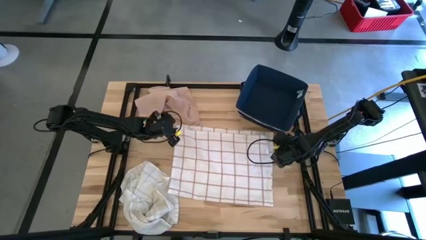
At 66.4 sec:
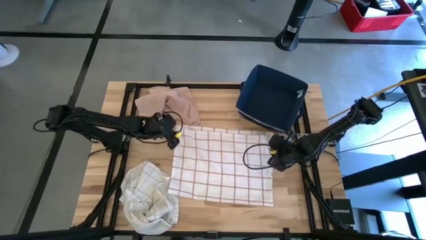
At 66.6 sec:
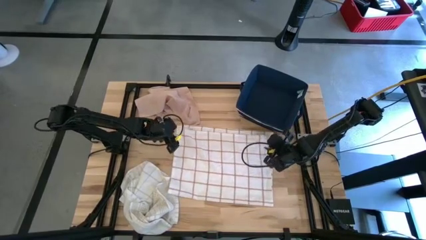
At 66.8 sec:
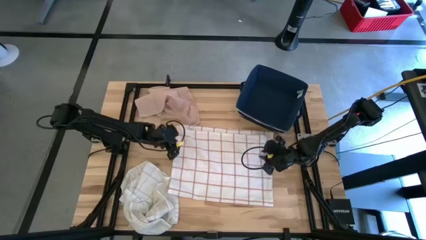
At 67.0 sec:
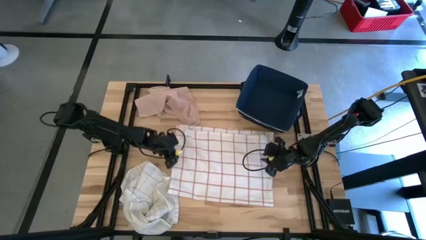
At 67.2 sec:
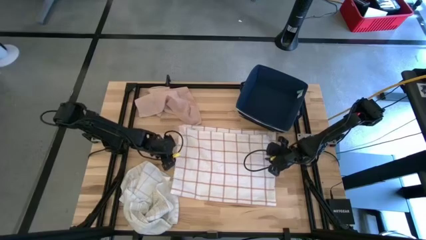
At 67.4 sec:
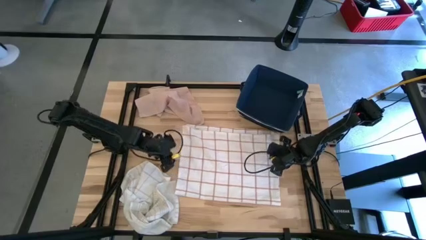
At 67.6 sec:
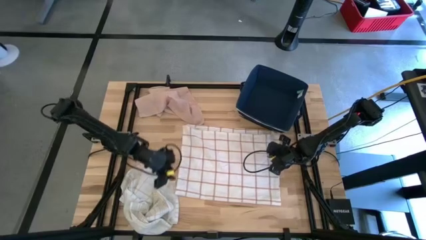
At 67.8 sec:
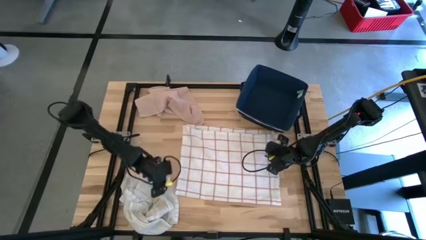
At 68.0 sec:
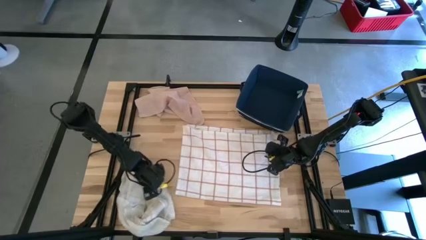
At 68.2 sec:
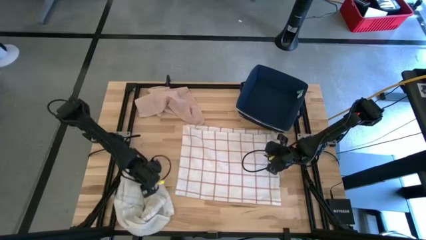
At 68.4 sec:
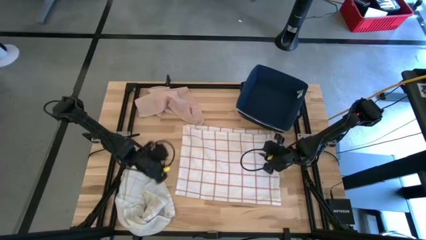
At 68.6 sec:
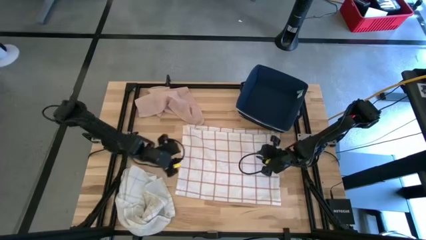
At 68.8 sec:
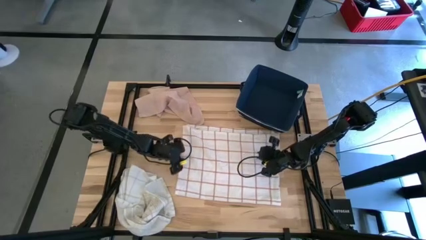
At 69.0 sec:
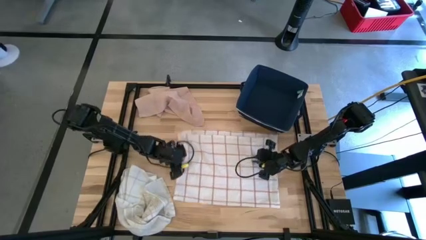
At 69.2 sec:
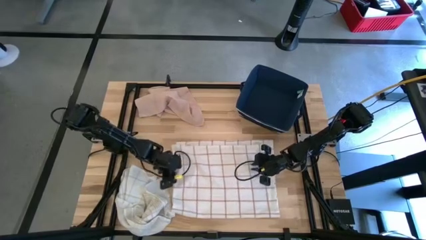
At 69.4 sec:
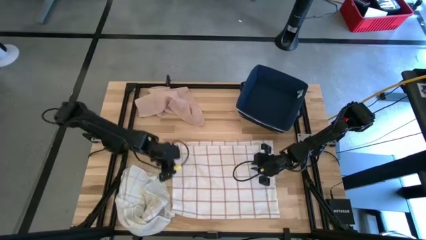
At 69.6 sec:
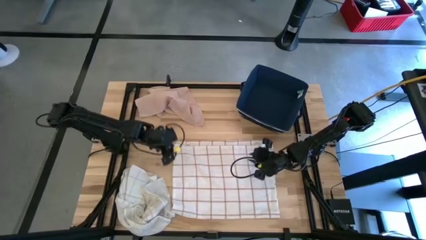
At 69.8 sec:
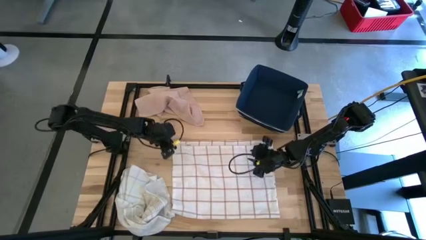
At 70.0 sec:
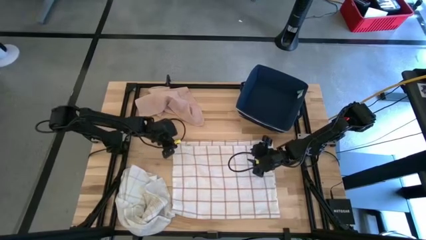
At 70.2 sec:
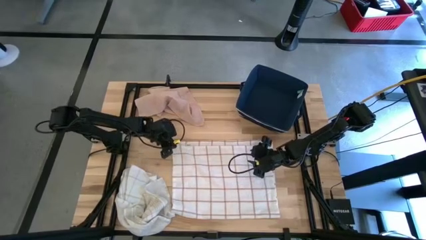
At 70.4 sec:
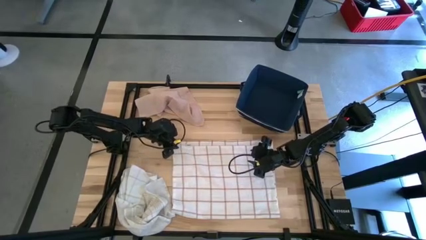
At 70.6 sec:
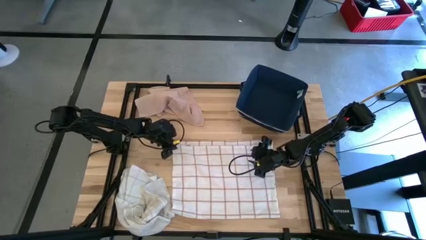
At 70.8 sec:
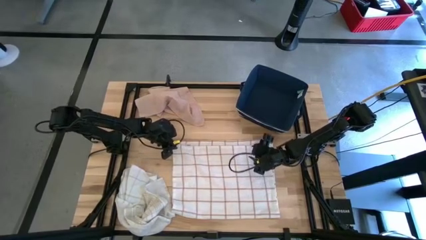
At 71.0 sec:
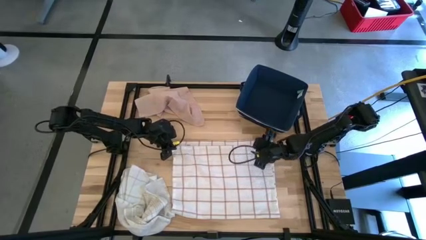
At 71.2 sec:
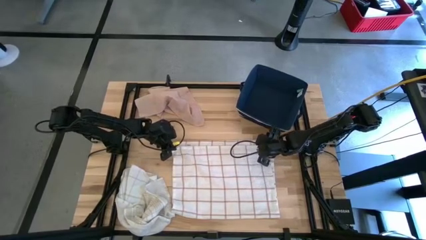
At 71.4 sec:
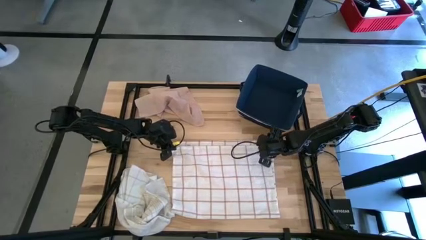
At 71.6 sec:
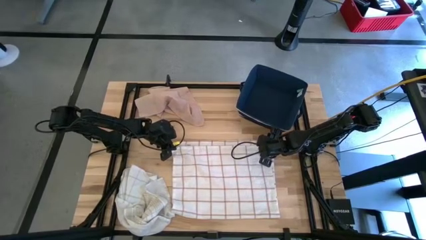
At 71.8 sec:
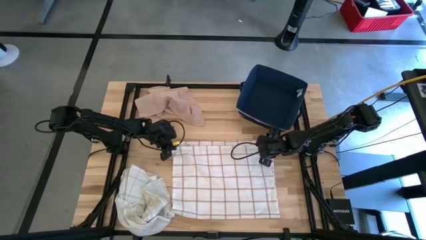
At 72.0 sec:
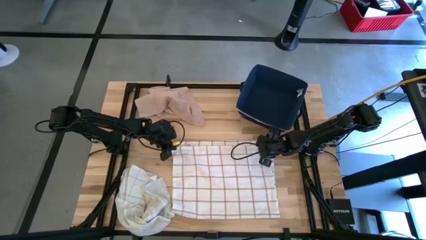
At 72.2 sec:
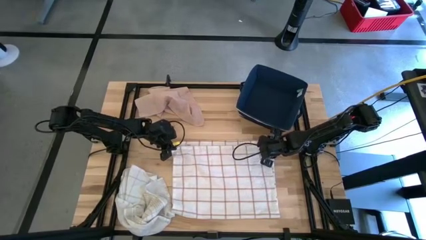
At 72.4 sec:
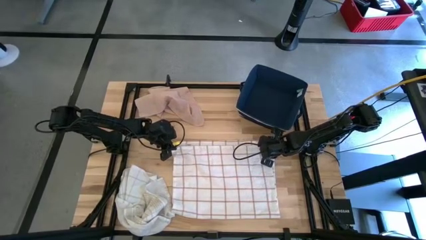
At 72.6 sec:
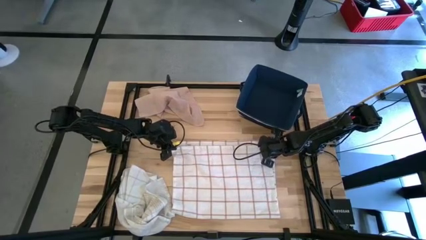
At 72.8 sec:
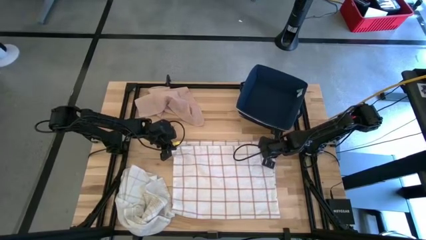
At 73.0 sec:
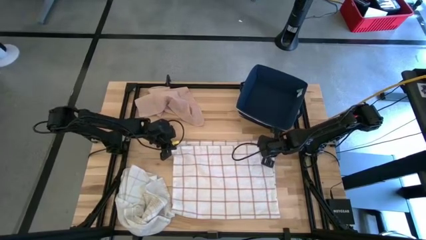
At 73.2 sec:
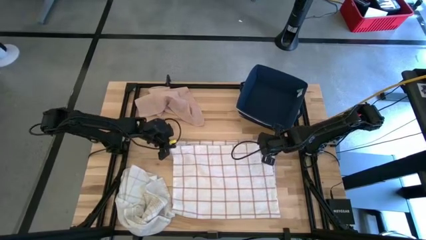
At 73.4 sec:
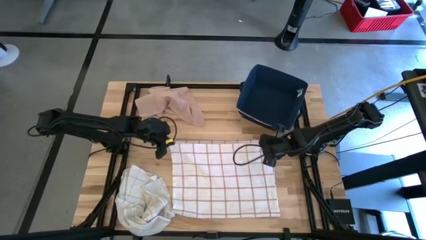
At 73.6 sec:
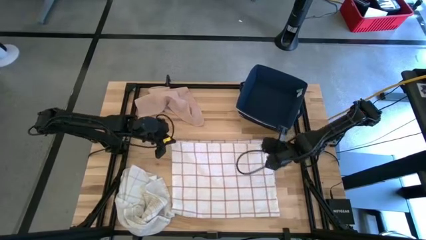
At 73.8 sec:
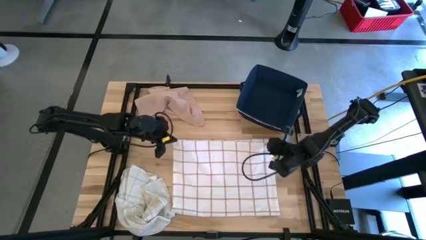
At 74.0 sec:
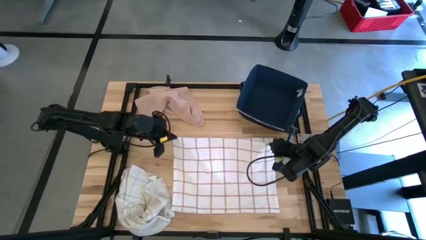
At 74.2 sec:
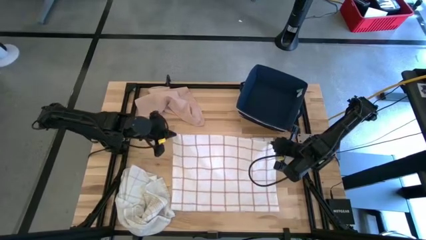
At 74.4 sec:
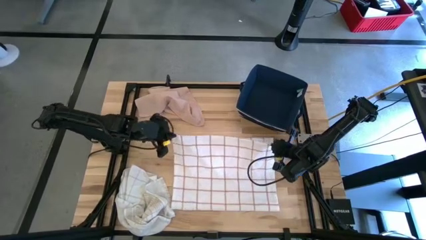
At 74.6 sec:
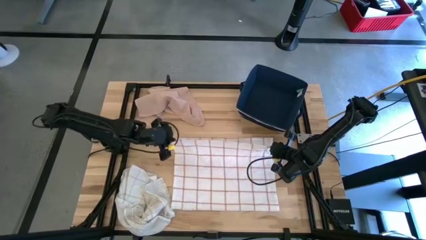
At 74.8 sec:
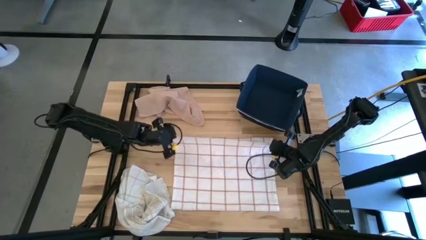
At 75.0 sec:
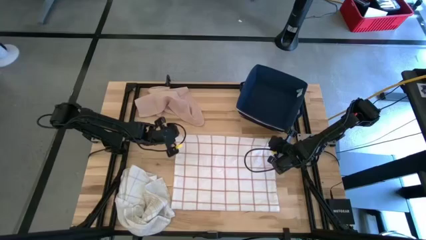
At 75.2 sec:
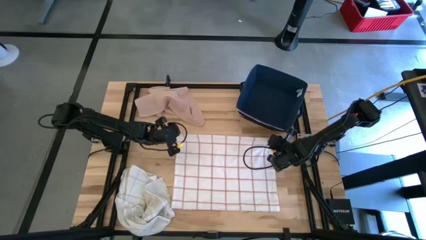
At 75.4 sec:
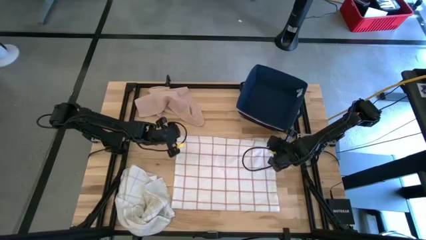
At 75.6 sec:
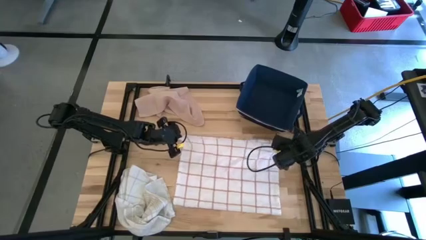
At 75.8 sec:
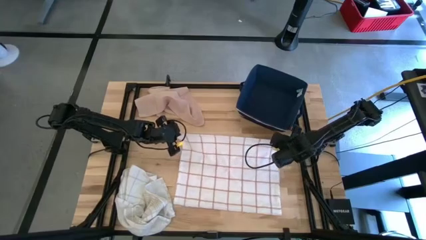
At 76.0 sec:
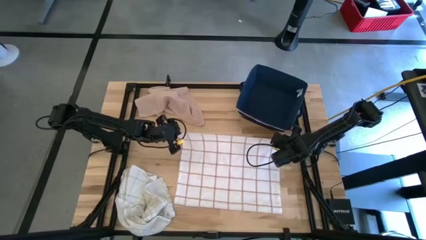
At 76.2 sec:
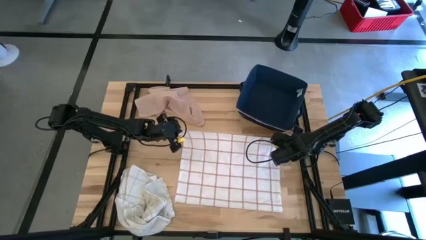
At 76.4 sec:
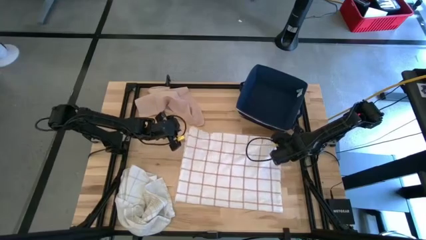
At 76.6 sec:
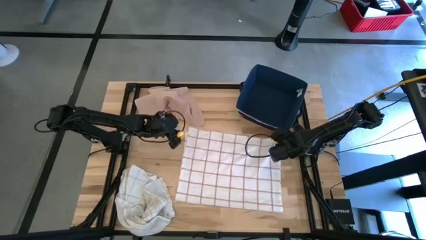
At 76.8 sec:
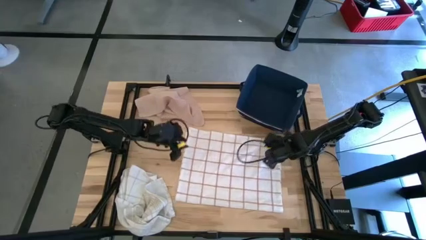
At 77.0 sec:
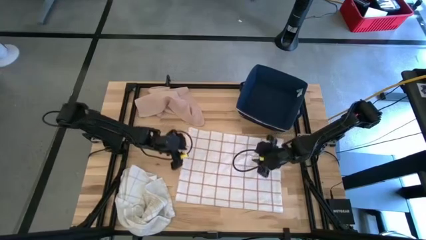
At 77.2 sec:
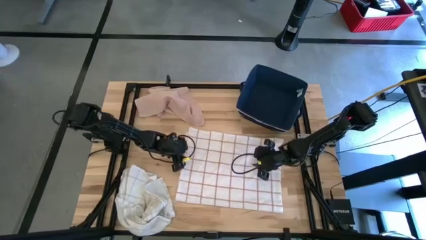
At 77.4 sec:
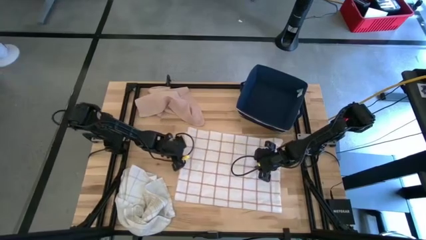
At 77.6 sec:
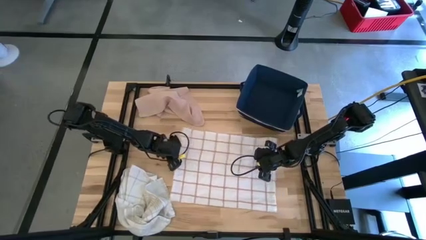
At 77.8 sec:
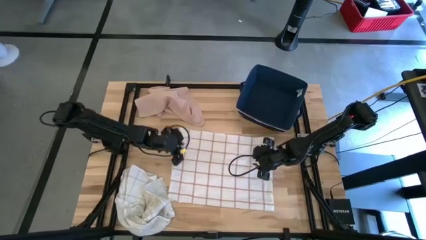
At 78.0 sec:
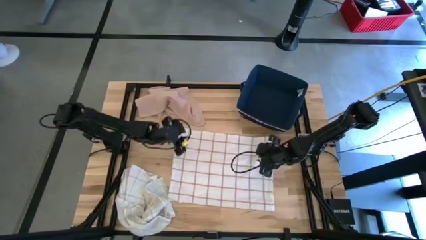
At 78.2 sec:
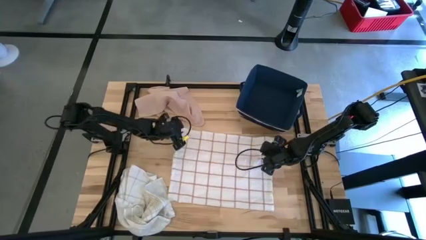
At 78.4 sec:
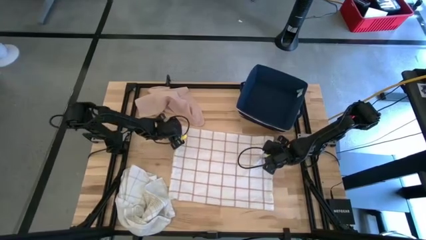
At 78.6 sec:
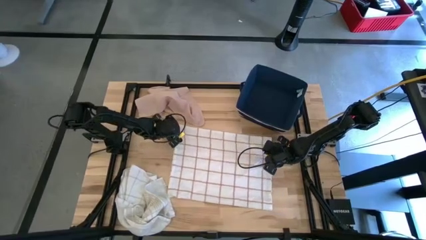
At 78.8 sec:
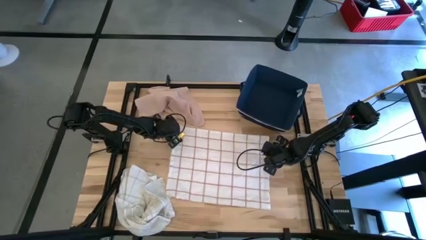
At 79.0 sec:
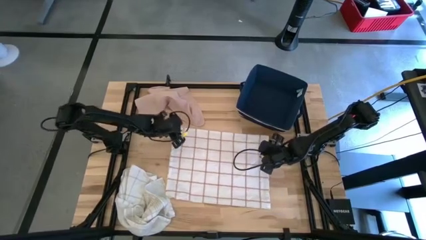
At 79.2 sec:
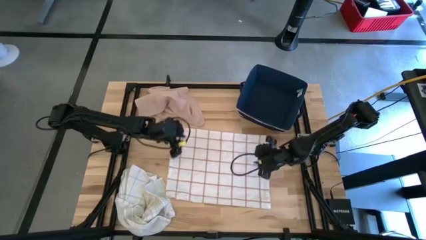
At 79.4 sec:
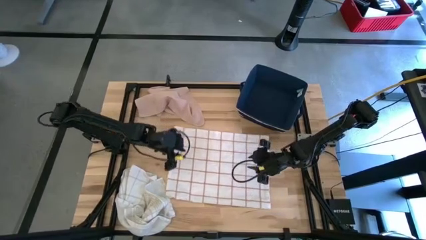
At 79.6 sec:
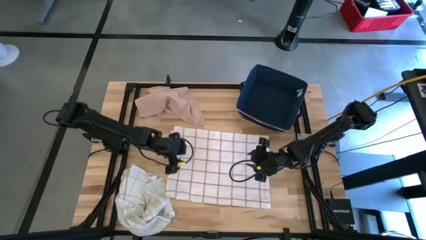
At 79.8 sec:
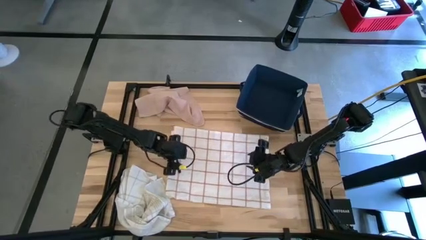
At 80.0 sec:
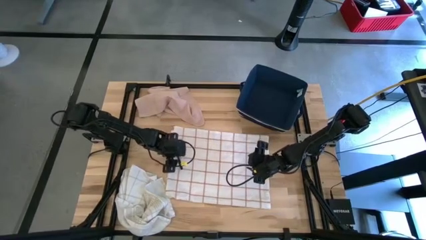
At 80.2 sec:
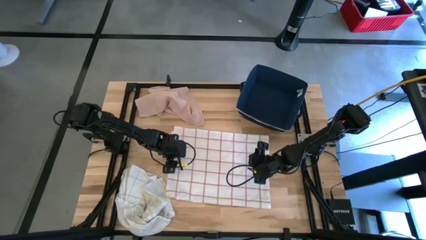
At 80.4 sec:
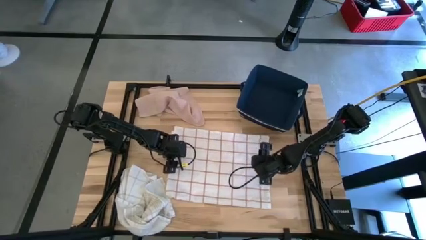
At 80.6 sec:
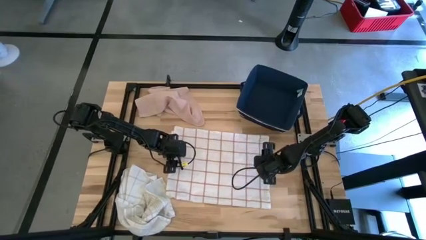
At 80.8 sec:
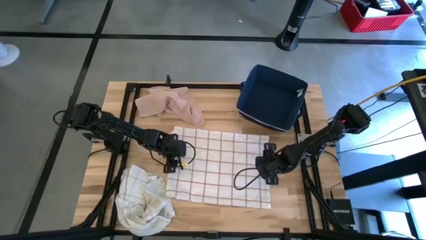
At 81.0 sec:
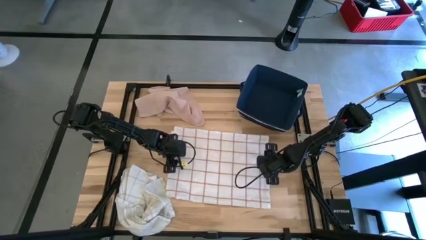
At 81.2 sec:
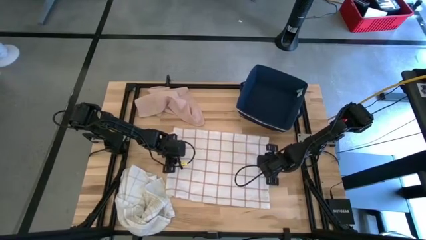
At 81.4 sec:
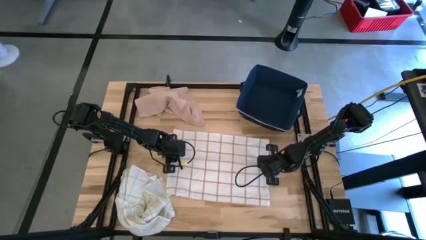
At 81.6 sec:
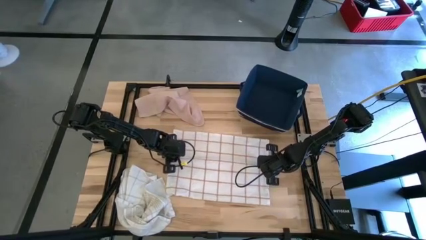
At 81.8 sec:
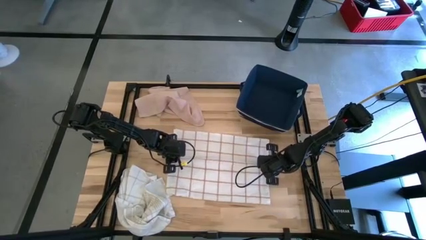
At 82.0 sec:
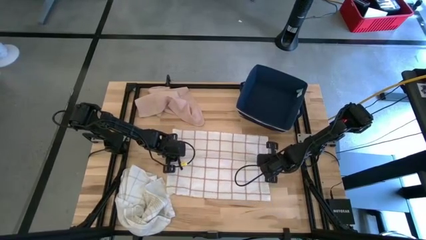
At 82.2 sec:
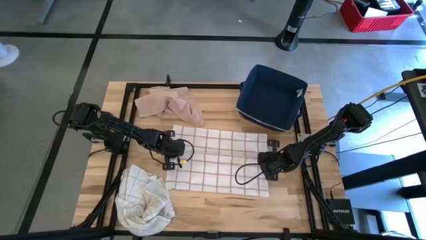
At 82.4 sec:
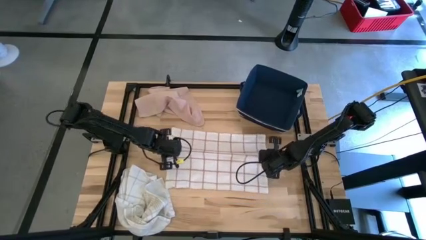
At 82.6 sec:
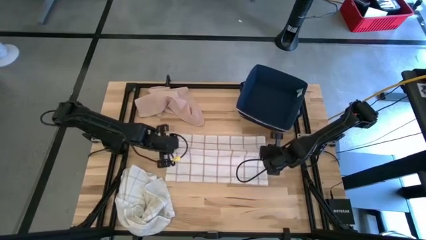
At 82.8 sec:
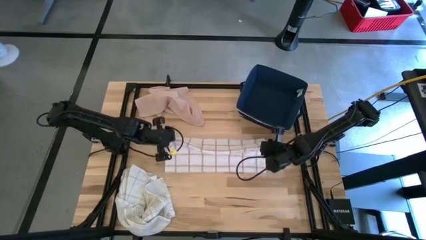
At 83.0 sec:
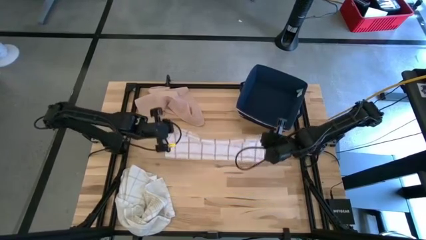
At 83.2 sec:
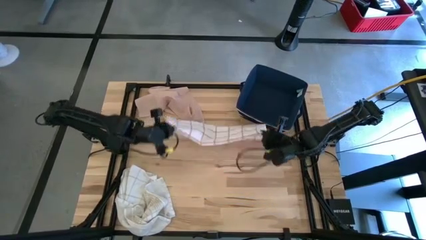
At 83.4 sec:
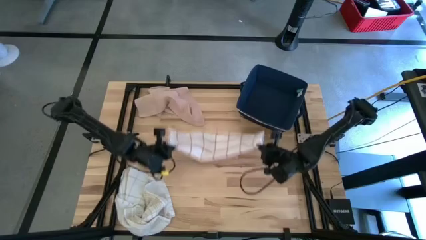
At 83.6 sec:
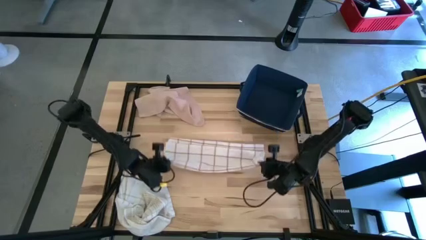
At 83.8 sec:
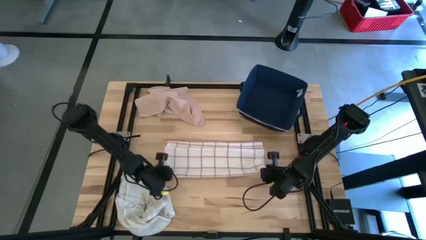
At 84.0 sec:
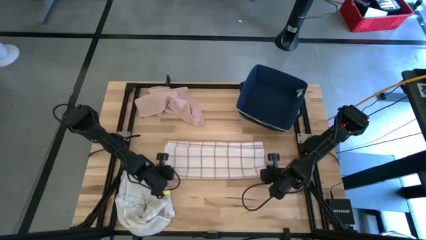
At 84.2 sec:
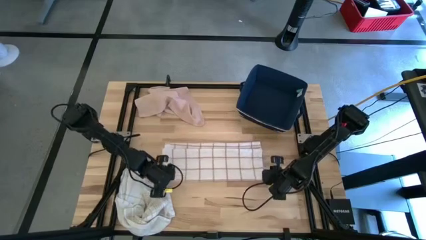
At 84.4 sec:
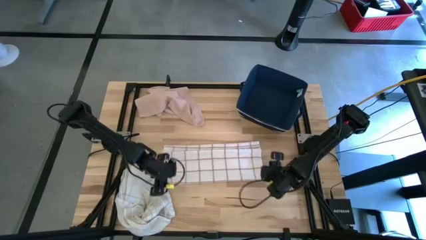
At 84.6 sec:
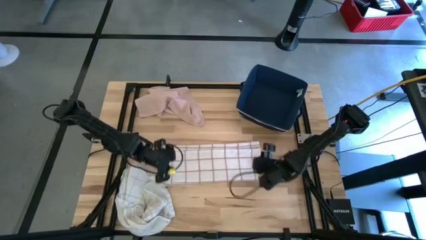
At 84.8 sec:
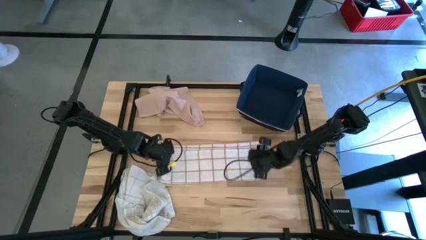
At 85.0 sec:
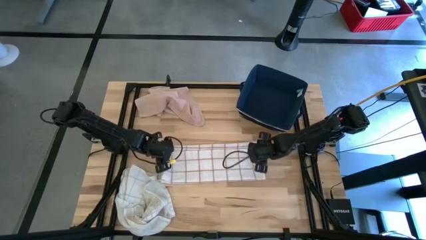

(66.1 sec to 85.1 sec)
Task: Fold towel
Fold the white with red-stripe towel
